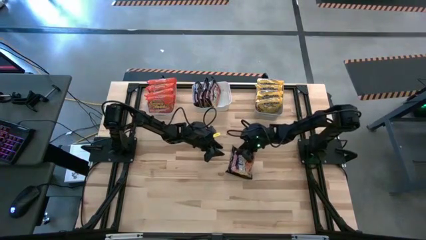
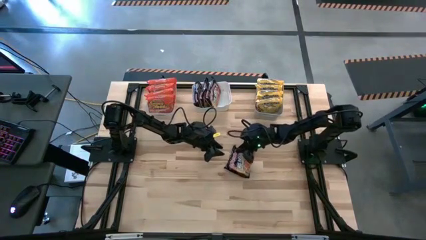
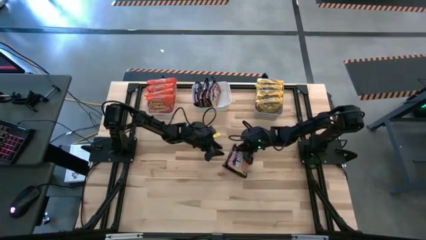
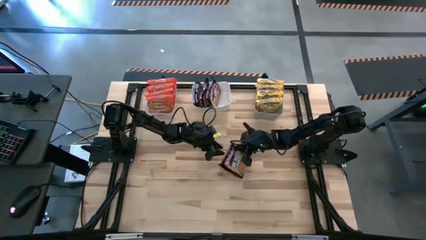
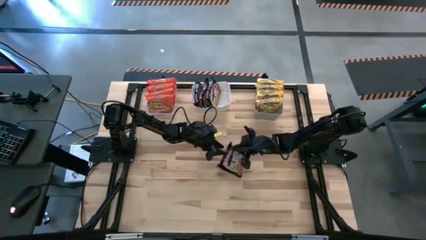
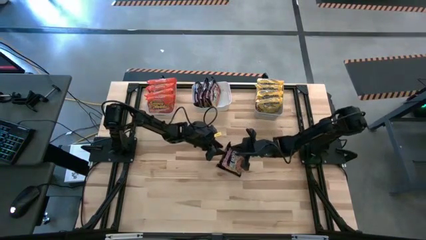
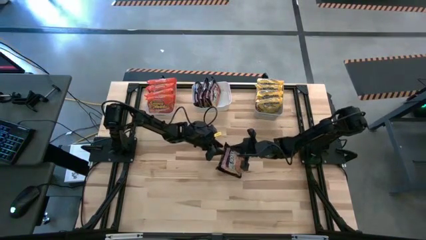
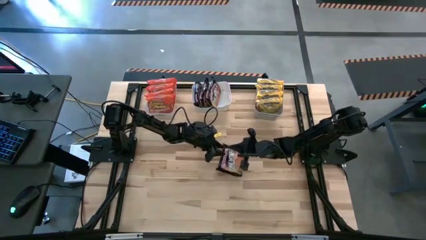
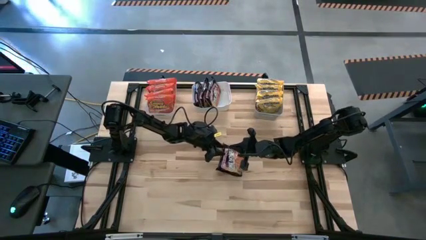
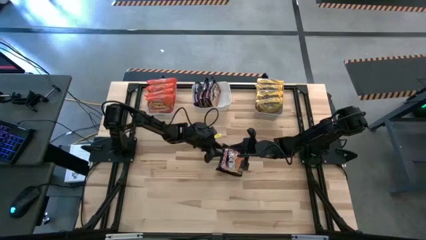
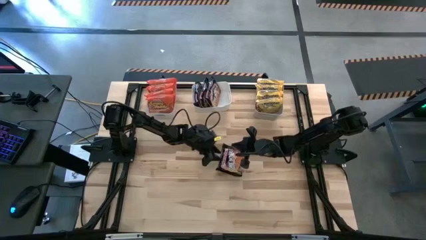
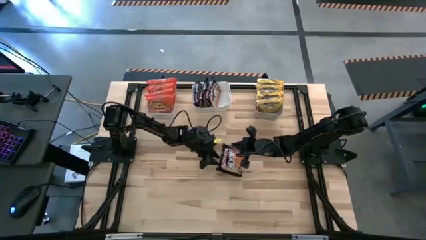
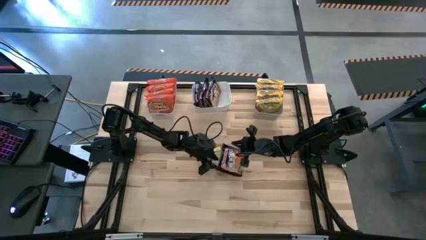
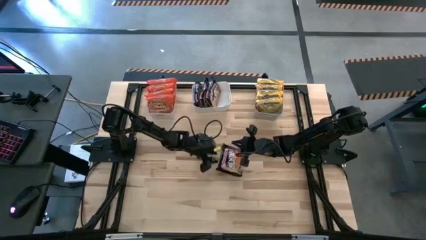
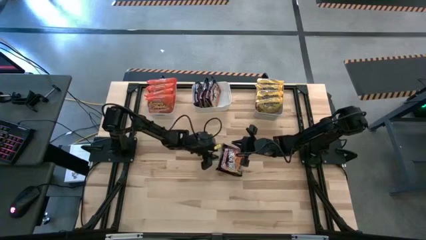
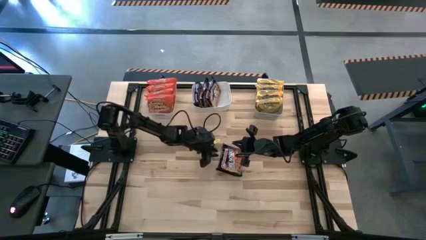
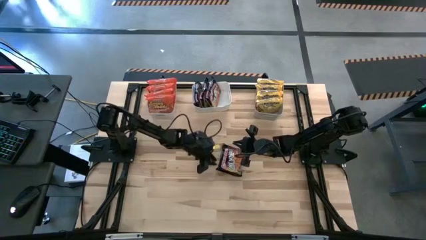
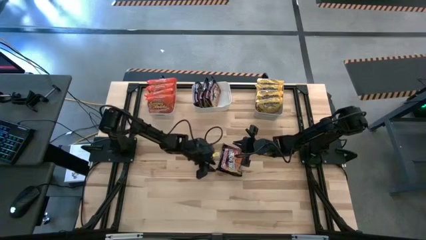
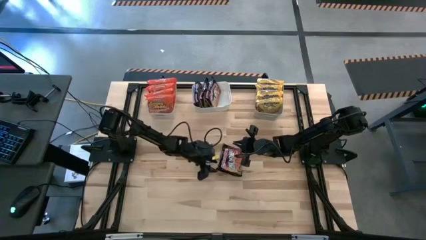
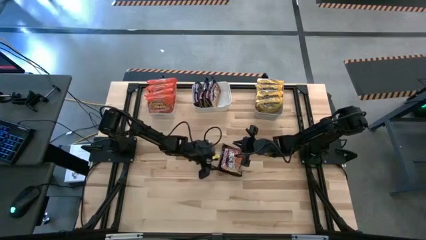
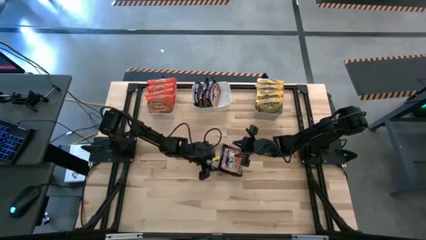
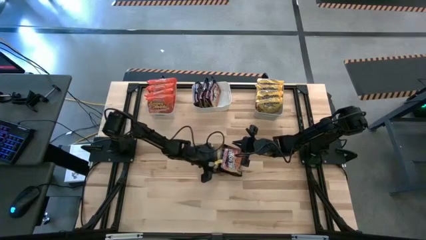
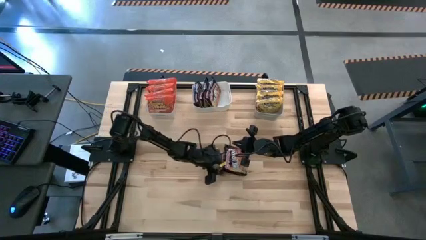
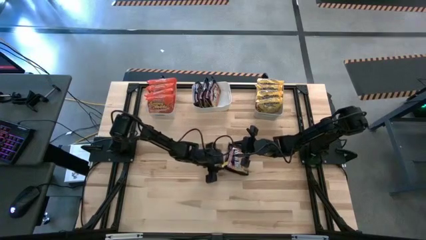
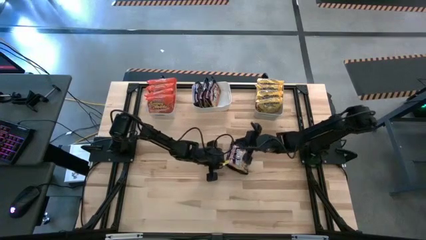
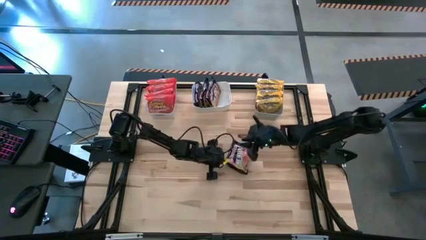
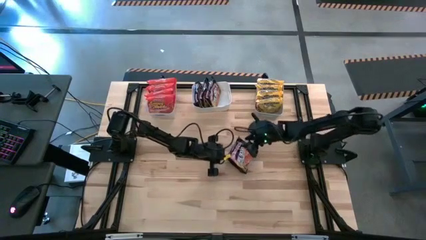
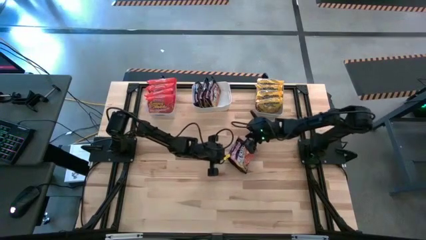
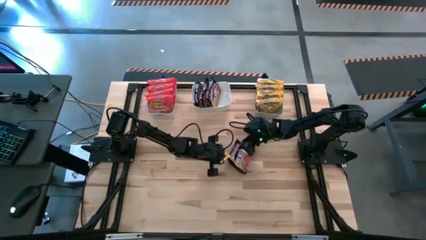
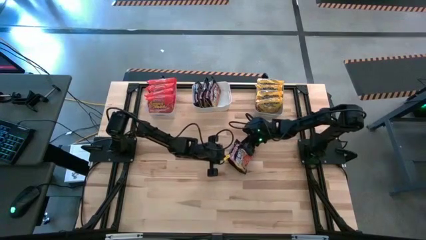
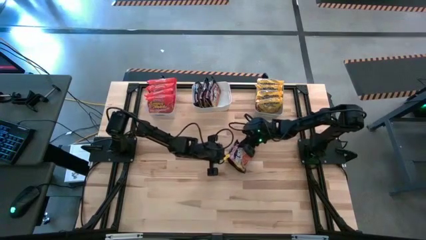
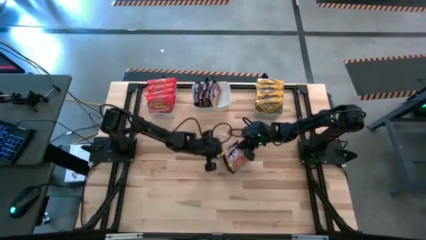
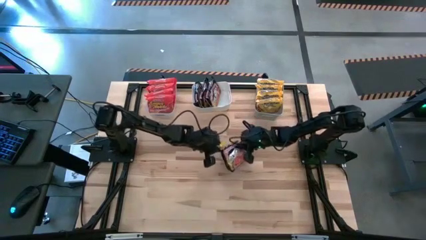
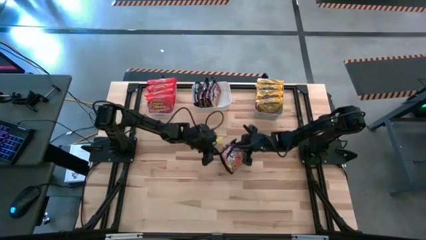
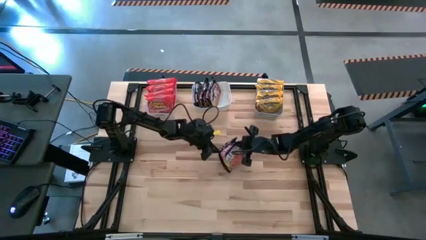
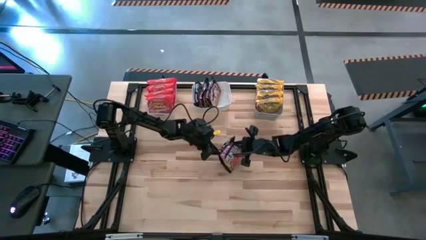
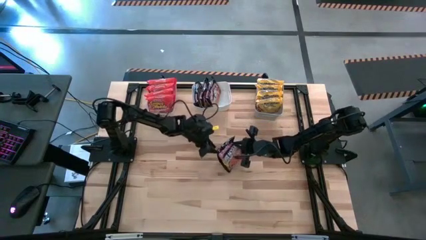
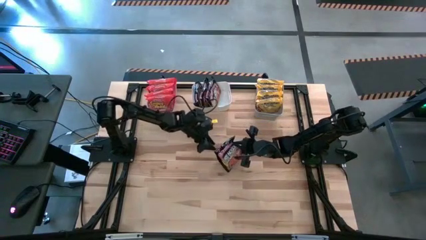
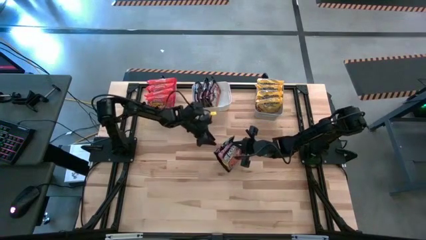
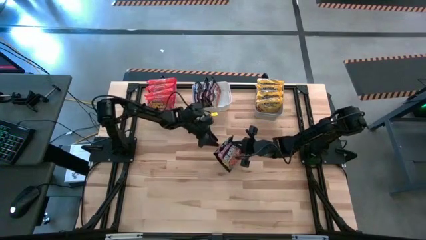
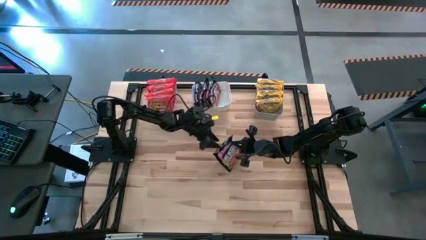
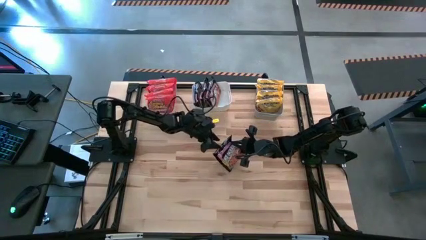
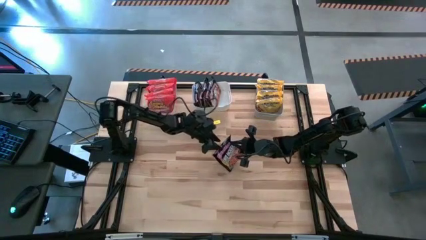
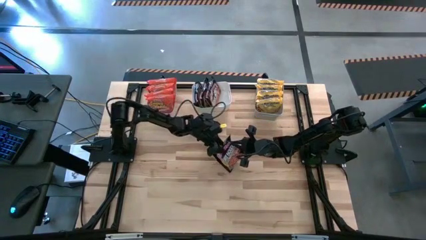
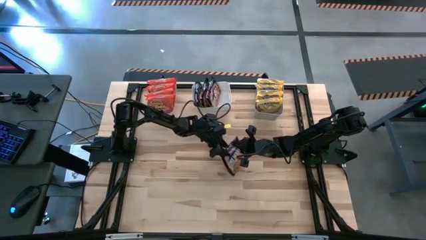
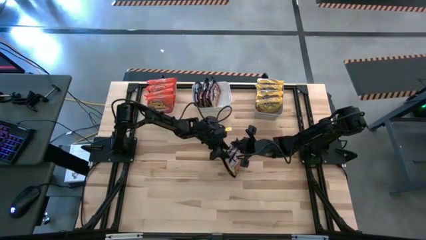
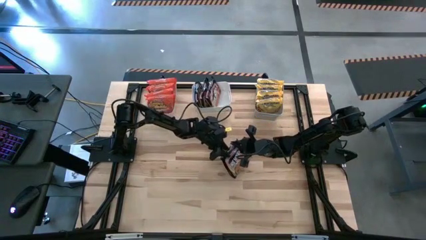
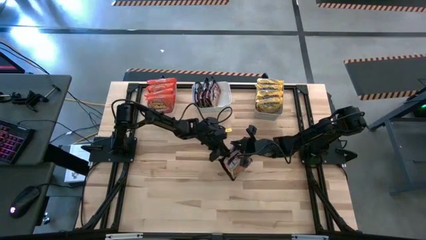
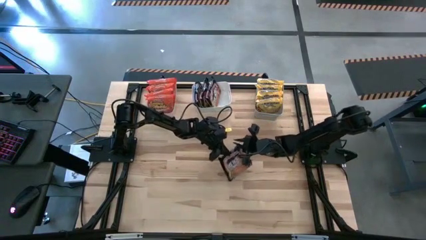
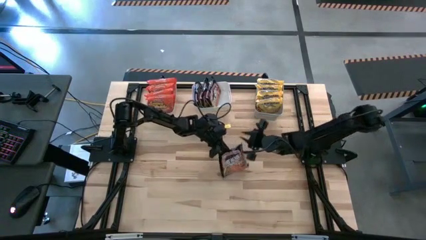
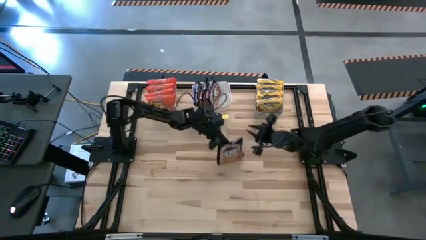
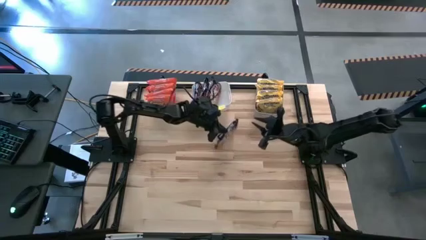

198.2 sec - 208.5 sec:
Task: Sort Maruchan noodles
Put the black noodle pack into the white bin

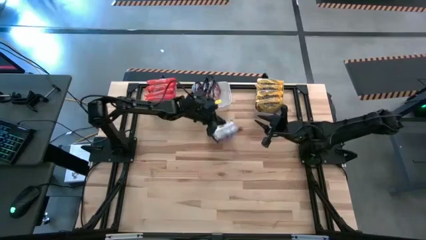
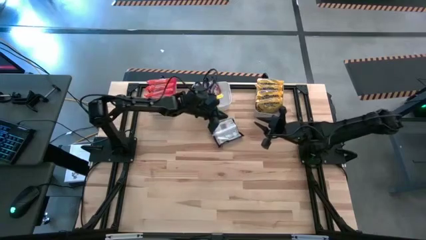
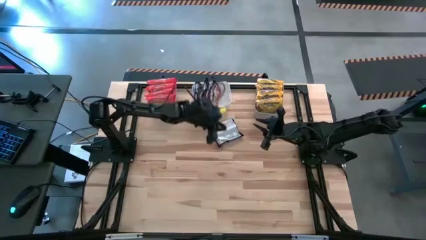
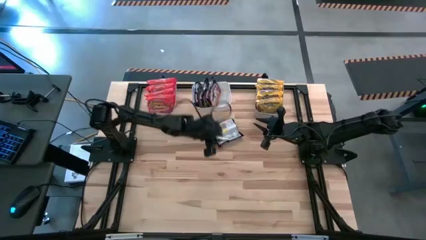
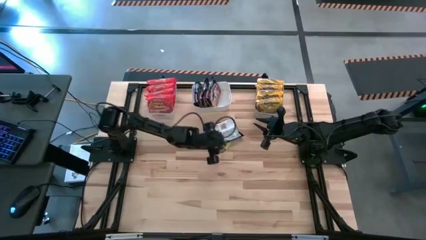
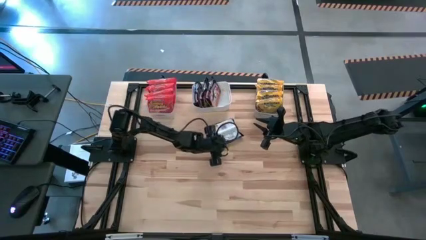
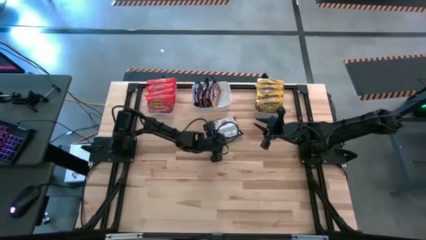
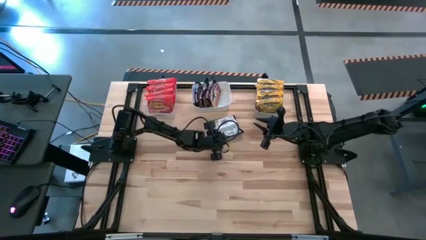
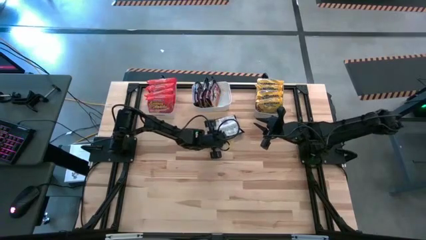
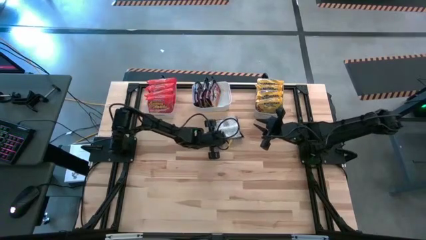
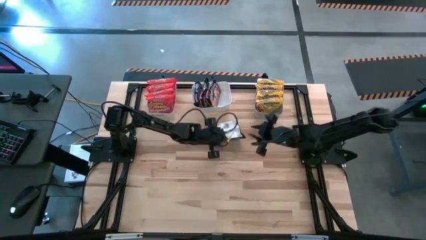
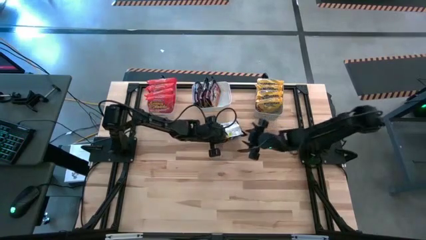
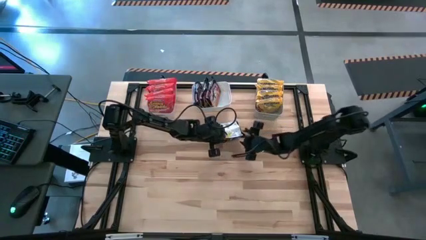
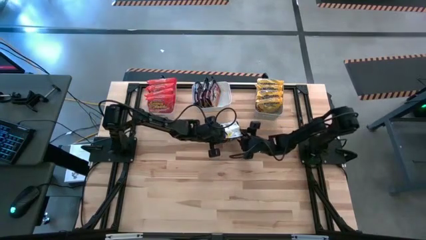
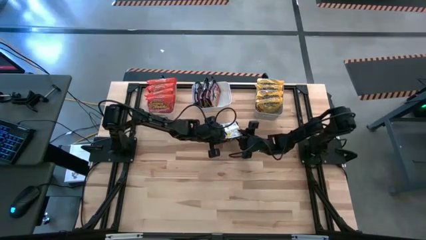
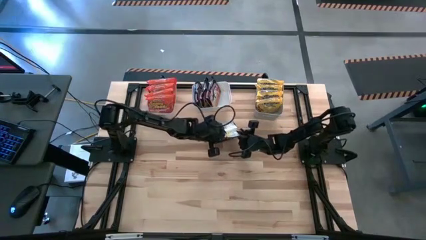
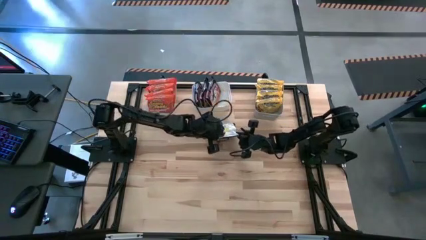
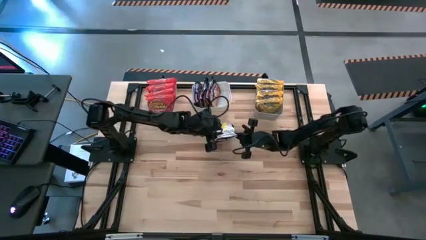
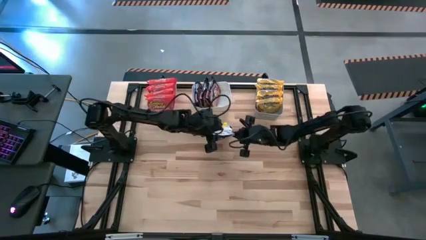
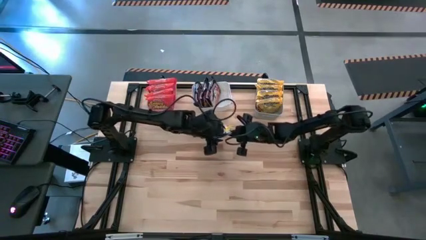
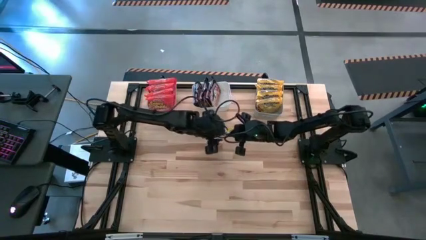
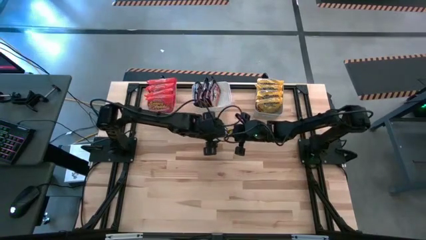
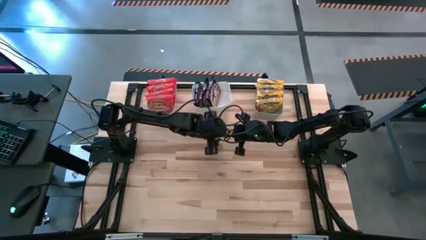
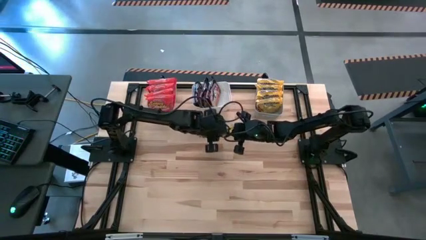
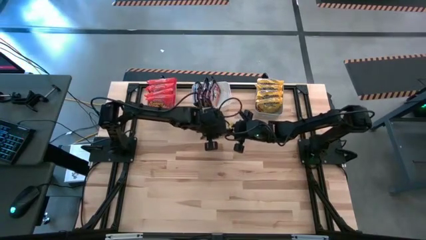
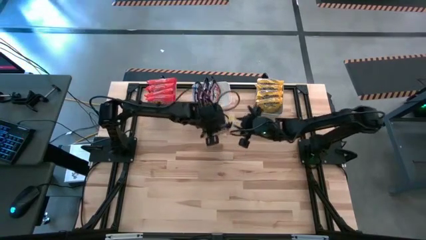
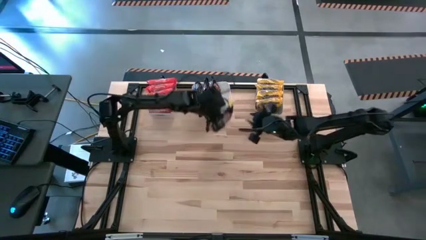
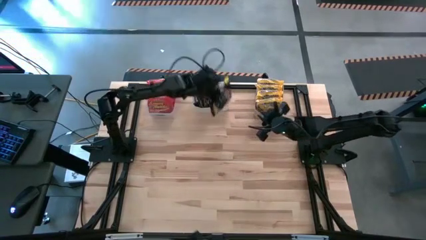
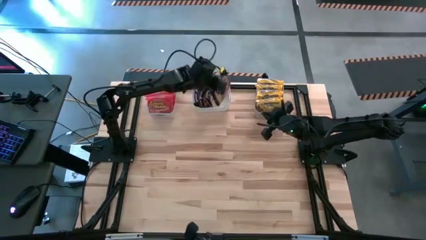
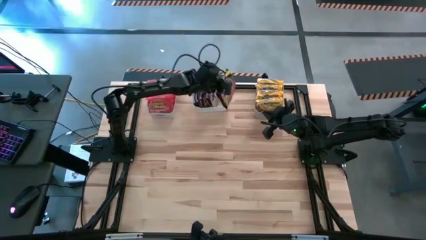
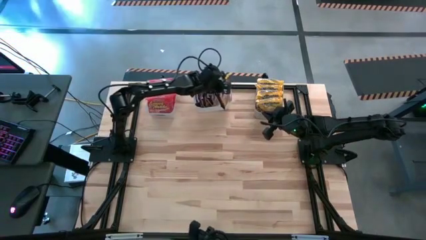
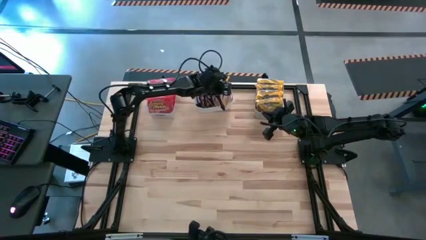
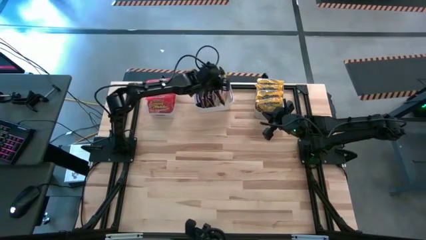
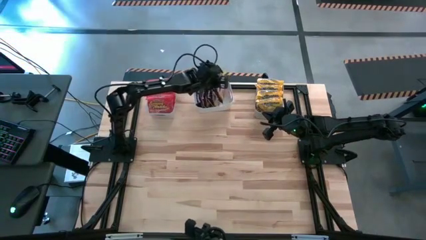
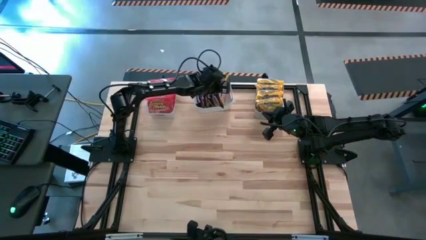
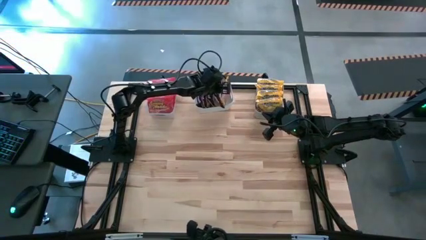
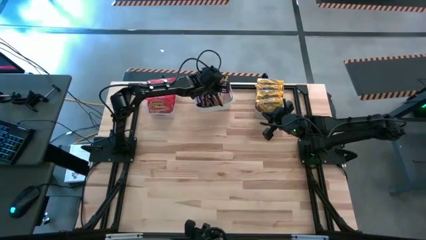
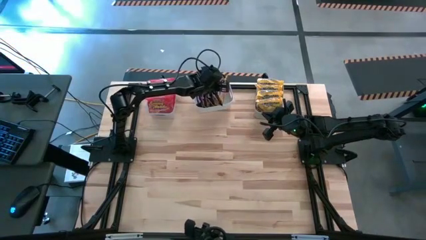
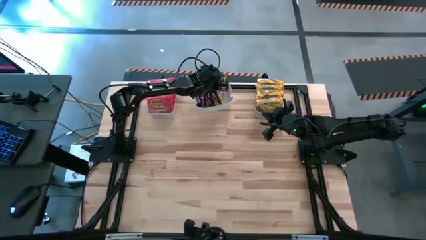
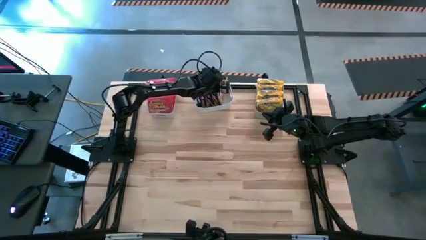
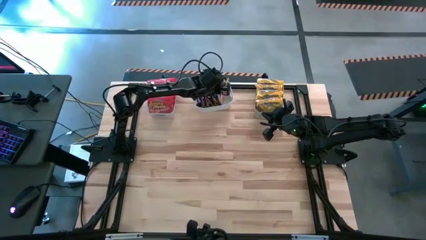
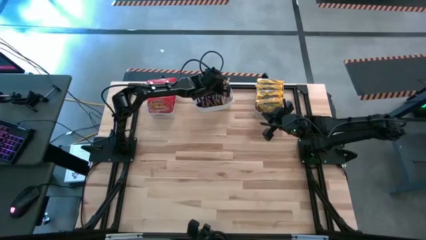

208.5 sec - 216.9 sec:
Put the black noodle pack into the white bin
